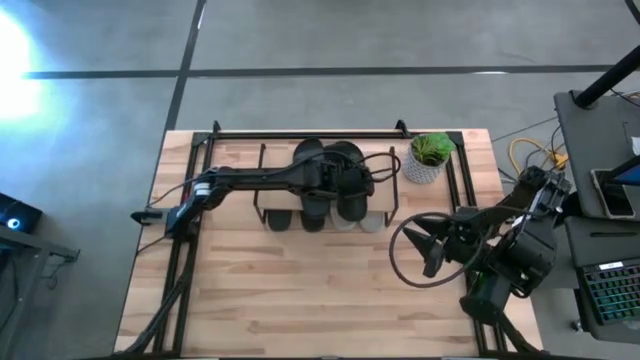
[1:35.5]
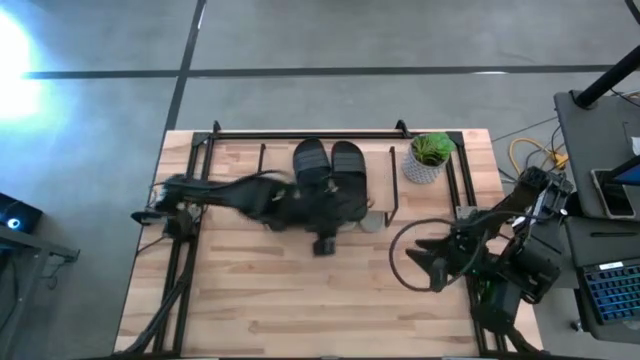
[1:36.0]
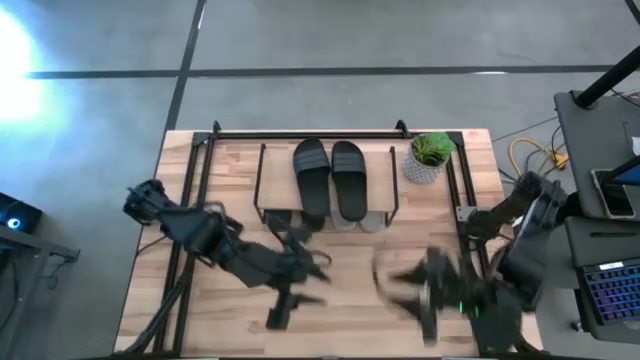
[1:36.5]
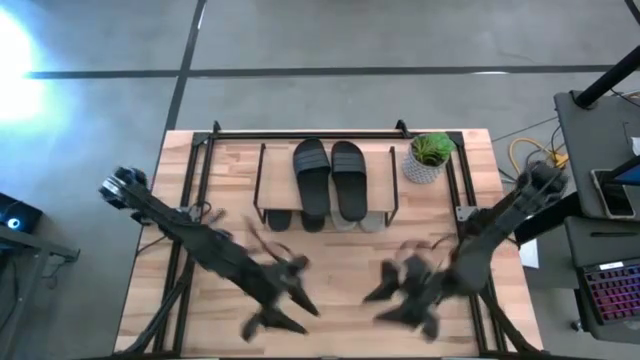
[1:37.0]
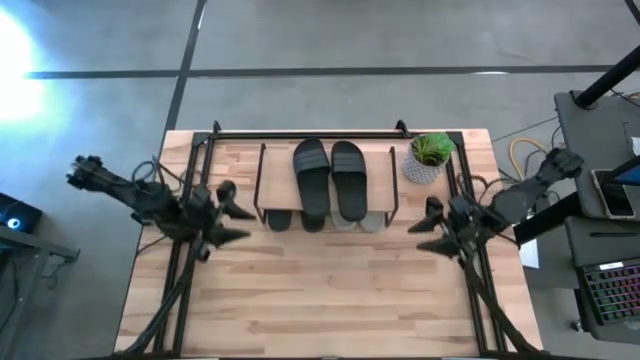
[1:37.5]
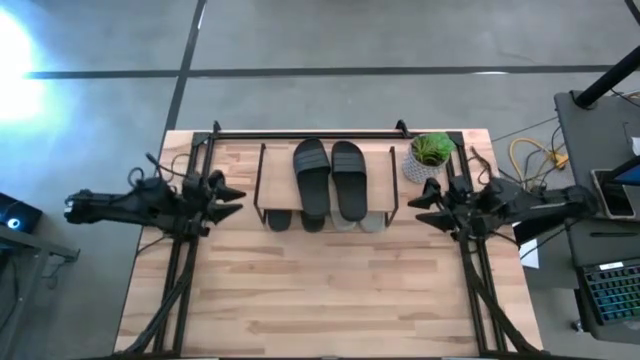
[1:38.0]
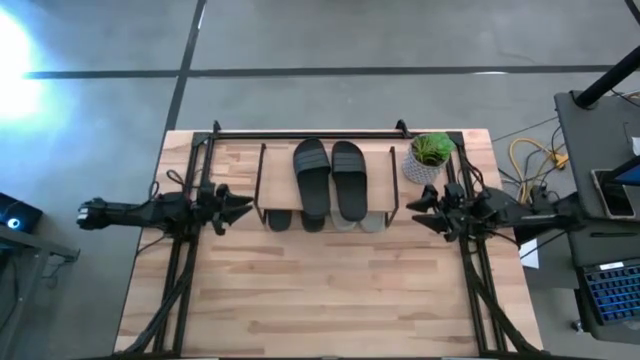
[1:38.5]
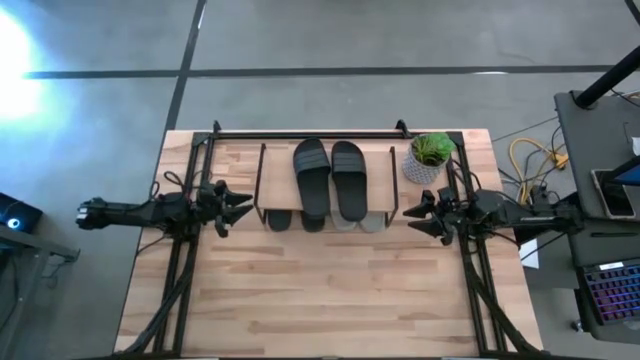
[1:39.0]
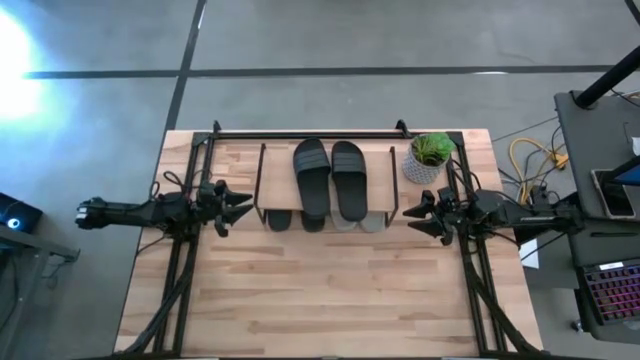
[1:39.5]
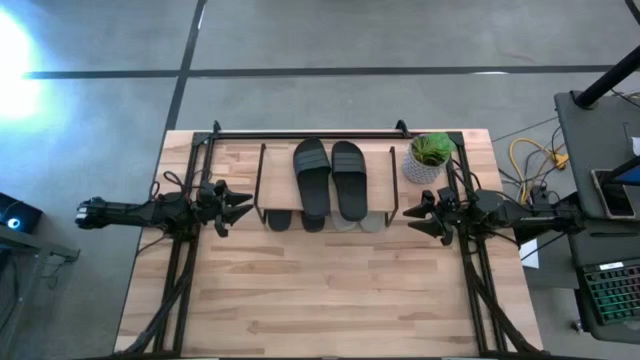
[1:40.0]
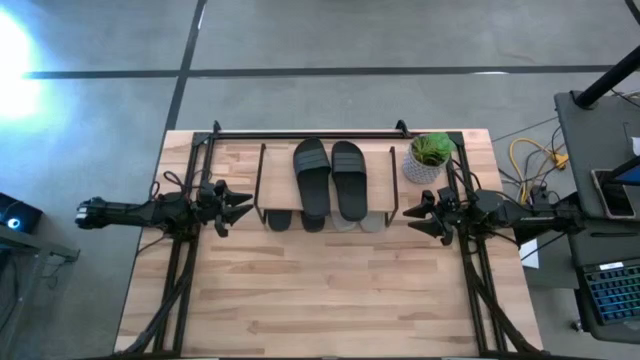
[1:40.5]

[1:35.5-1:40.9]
Task: Pick and place slides into the shelf
Return to Home Position

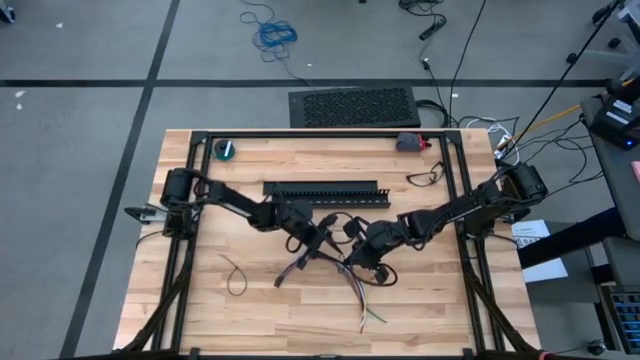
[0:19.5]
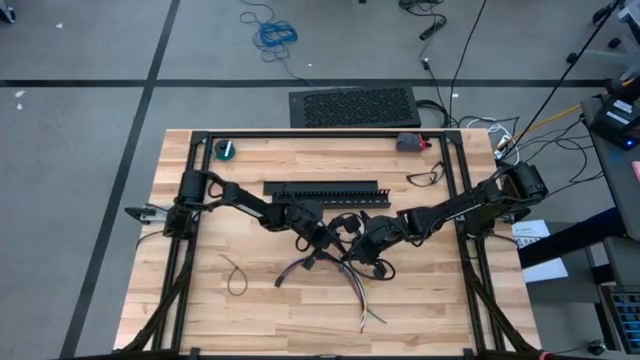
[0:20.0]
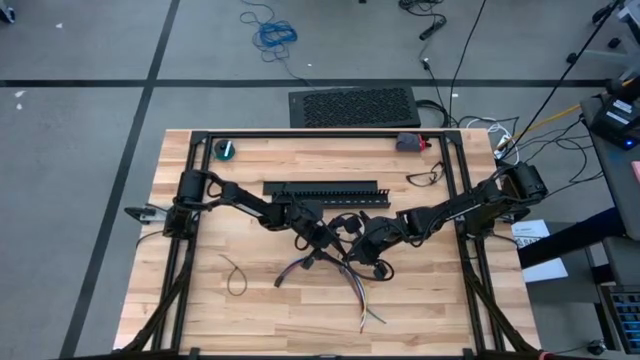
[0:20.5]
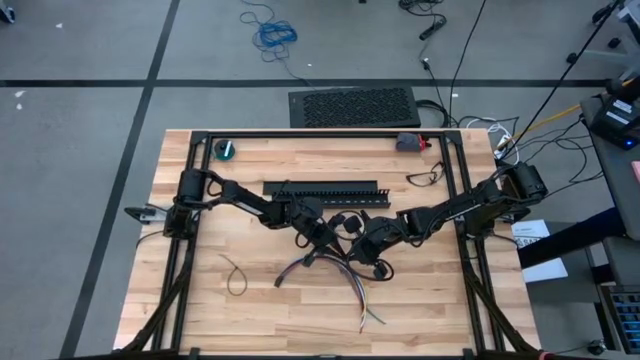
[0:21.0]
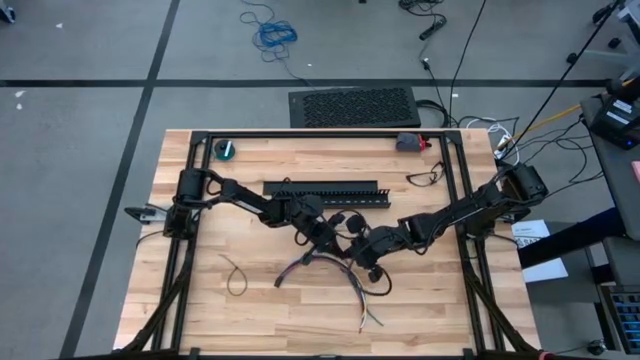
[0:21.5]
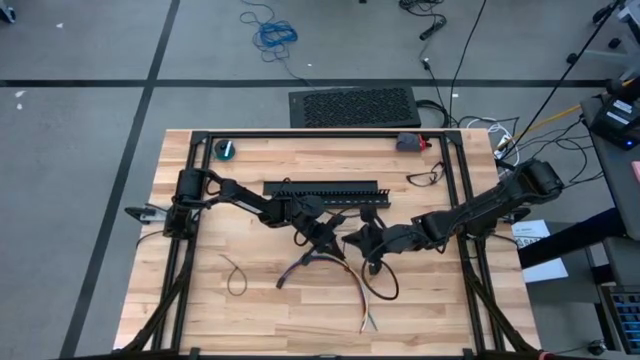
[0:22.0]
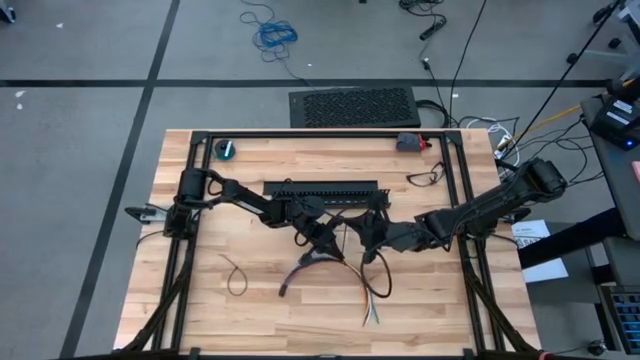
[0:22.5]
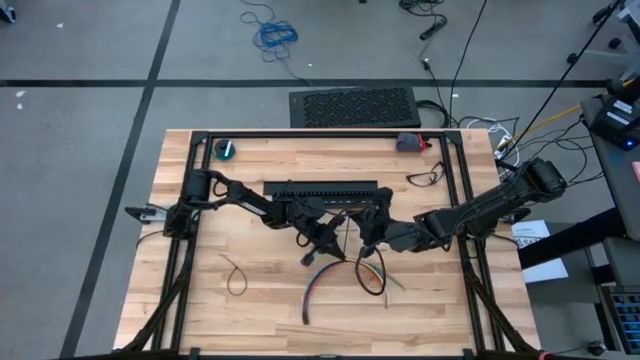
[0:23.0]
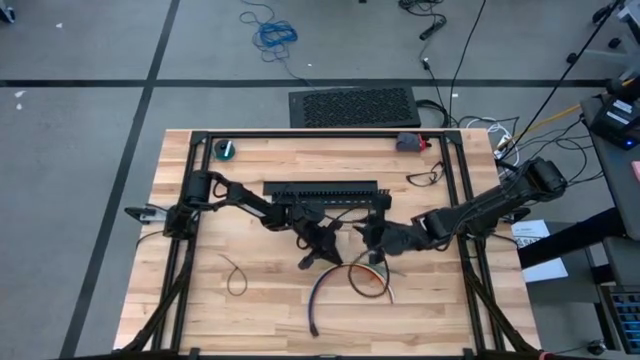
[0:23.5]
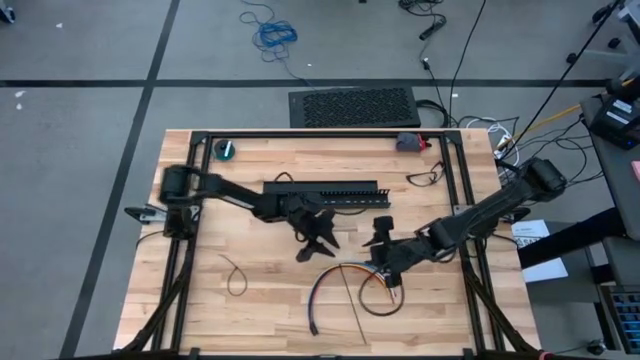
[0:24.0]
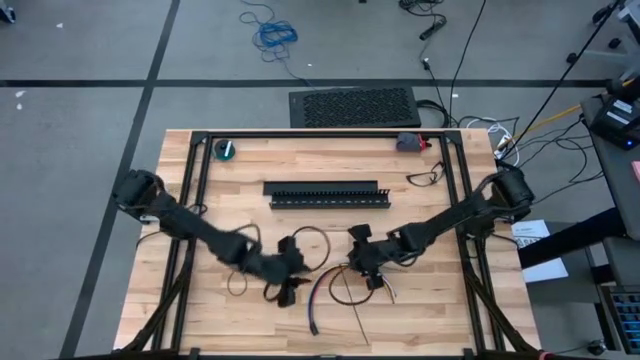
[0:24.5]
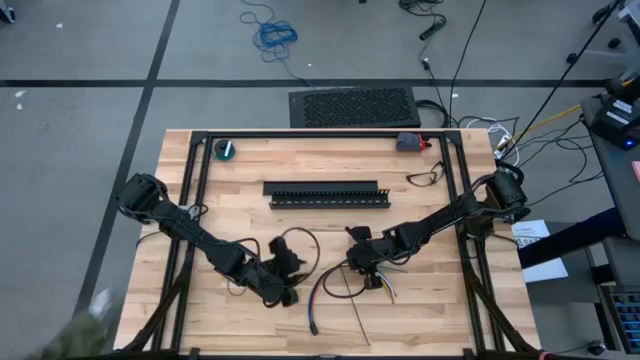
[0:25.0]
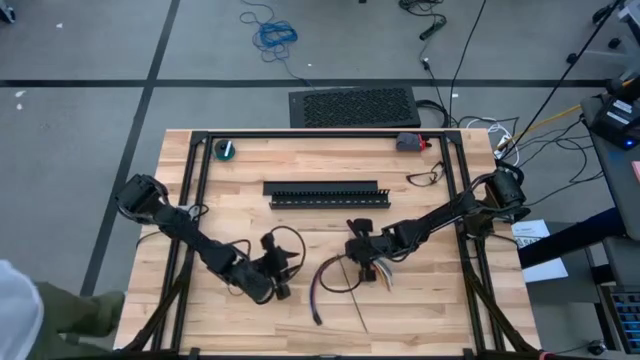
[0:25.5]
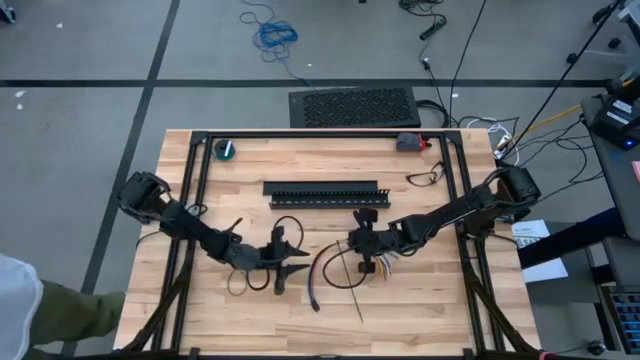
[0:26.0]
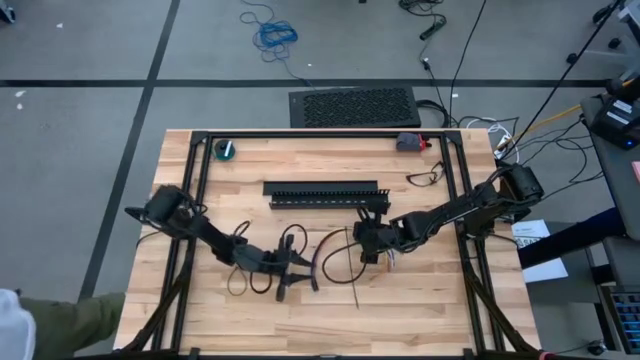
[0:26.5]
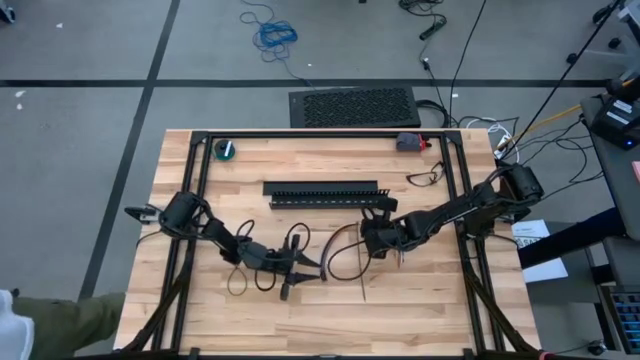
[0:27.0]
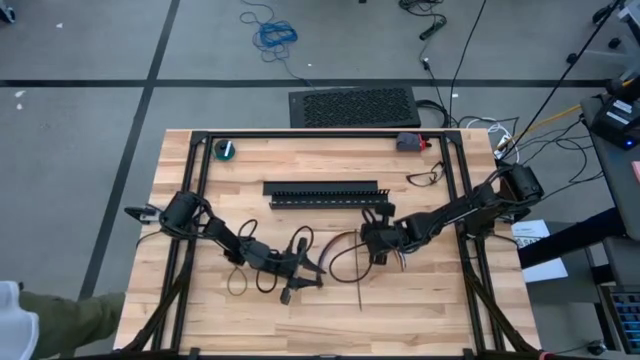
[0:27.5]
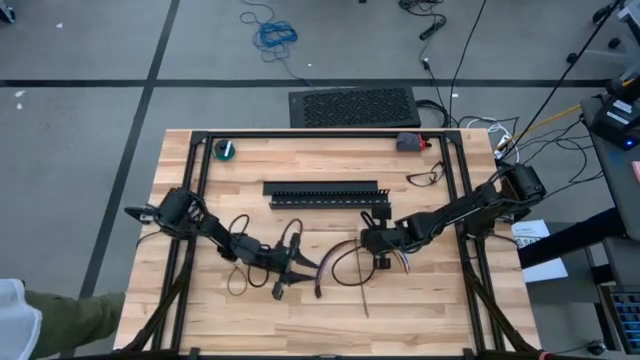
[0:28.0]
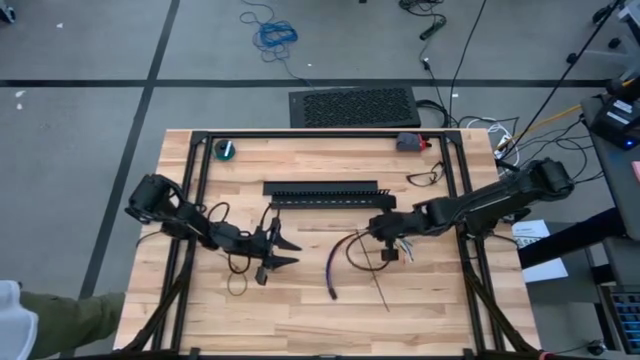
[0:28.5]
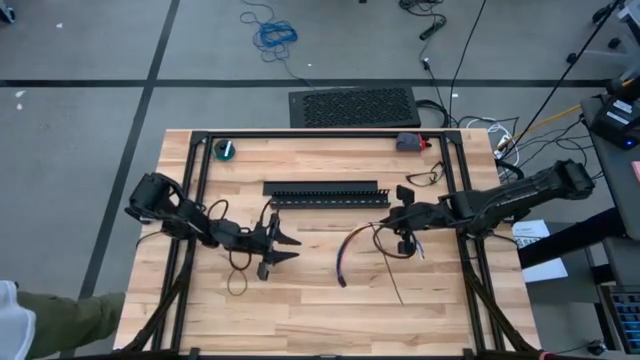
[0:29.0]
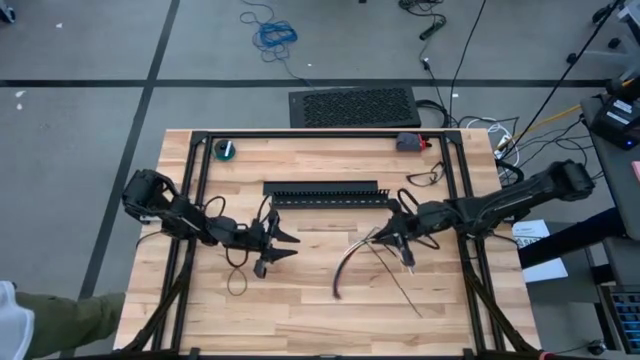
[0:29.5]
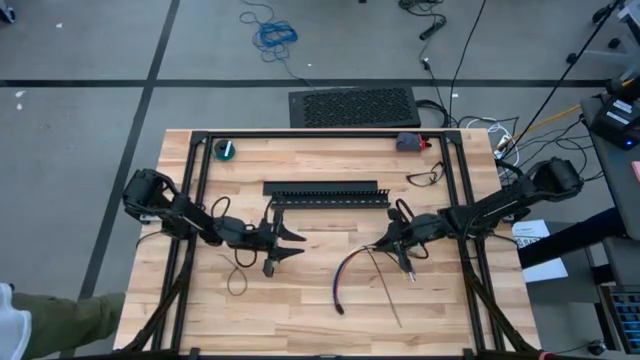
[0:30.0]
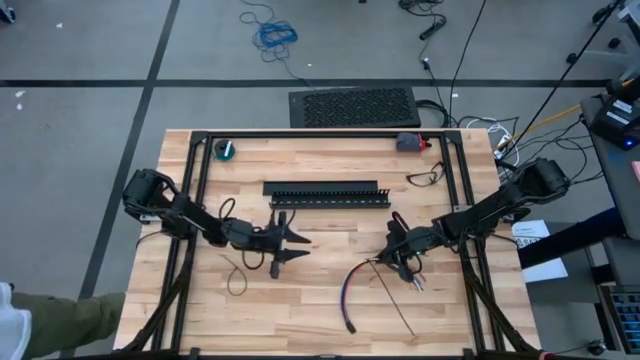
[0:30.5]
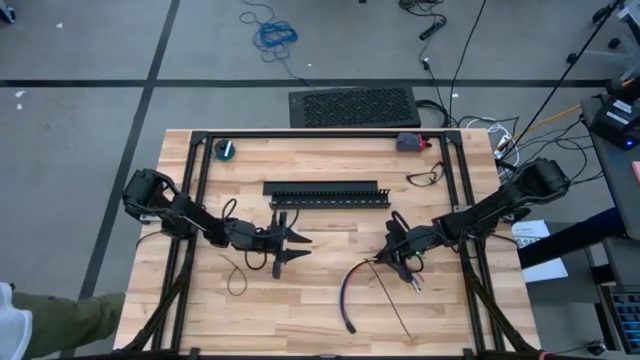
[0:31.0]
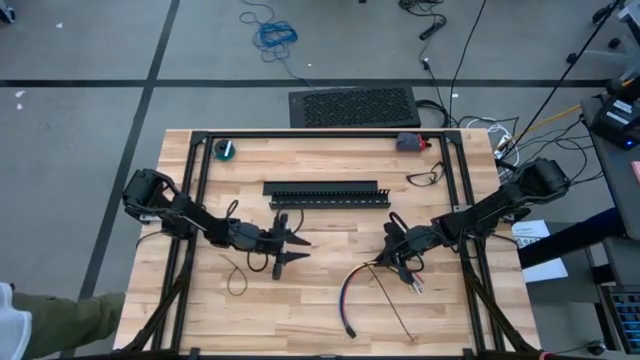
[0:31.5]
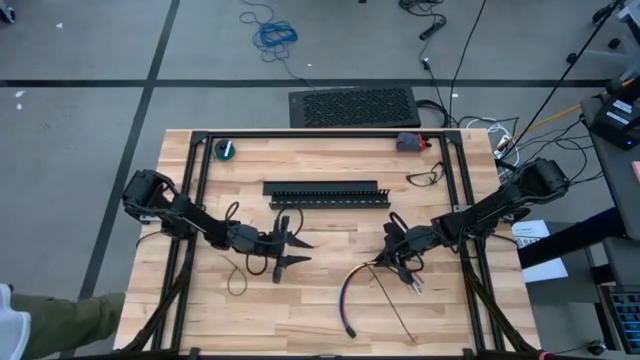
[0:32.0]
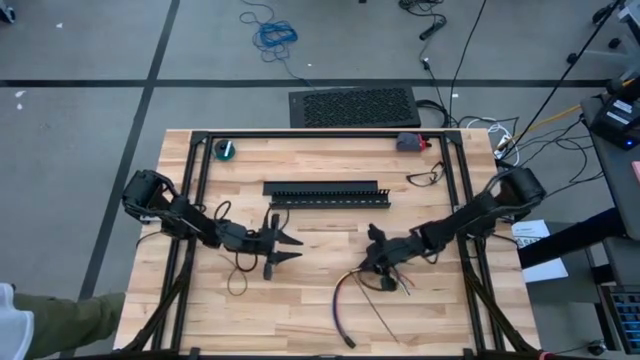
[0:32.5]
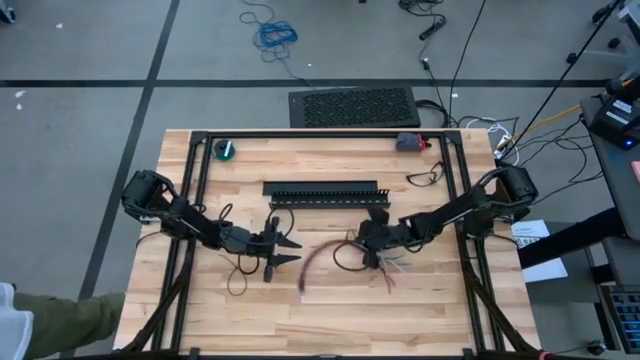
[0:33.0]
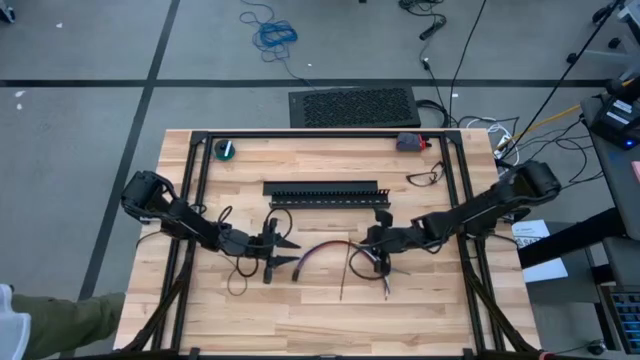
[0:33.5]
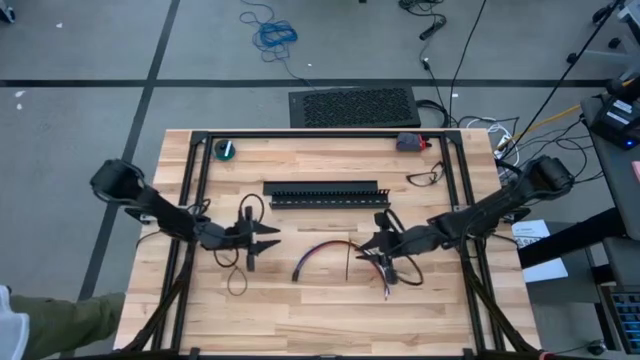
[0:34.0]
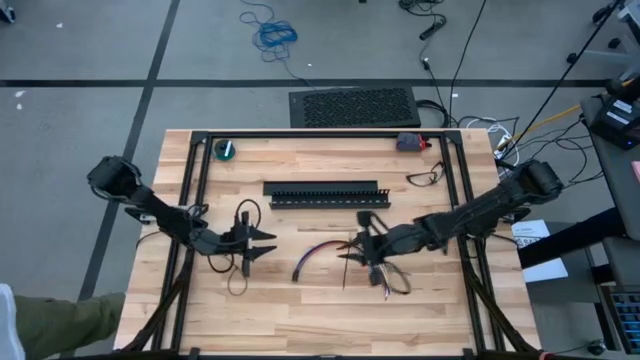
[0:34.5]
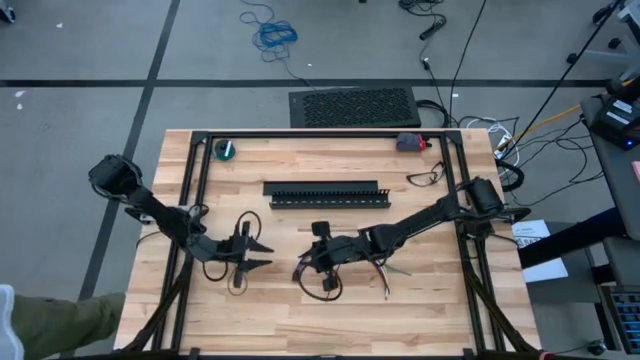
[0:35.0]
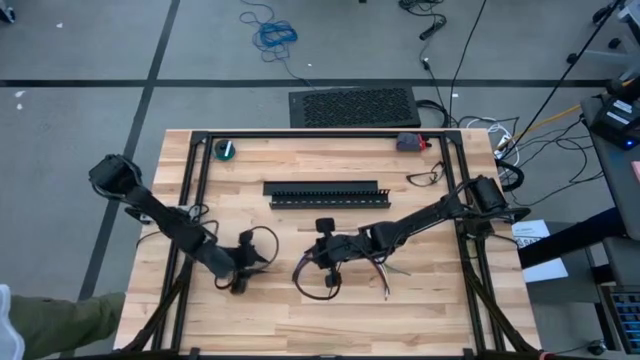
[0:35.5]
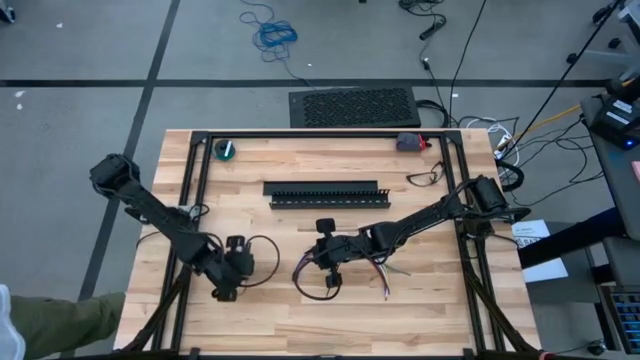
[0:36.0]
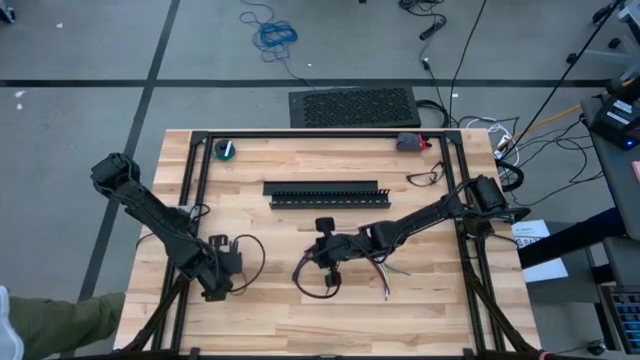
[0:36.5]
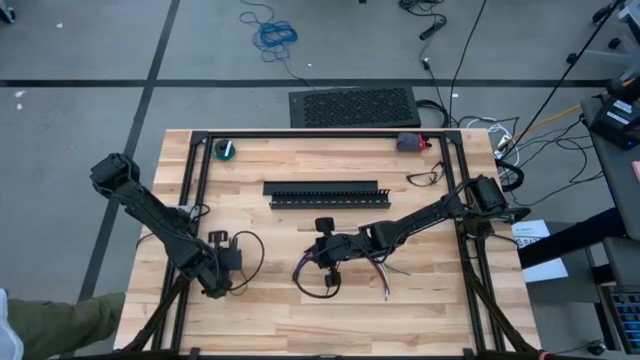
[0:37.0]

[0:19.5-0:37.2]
Task: Ziptie cables
Wrap the cables together using a zip tie
